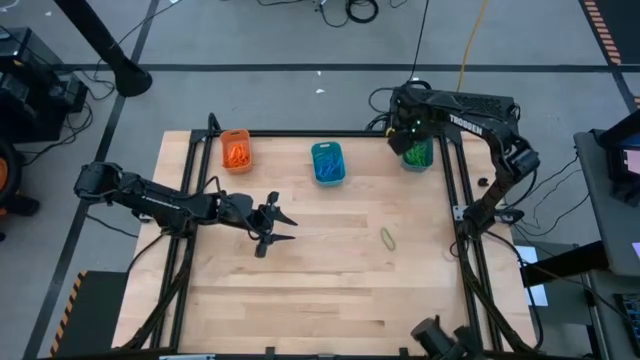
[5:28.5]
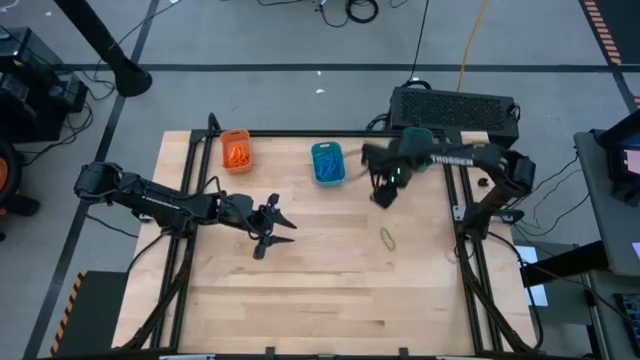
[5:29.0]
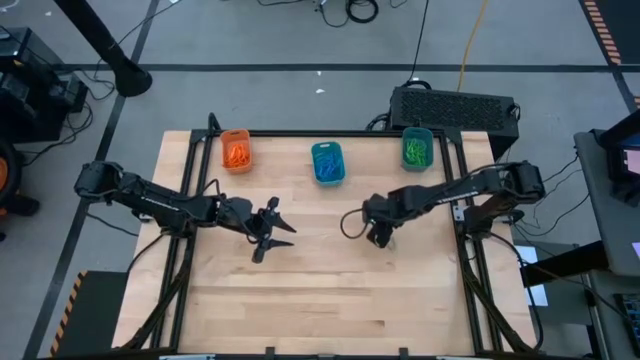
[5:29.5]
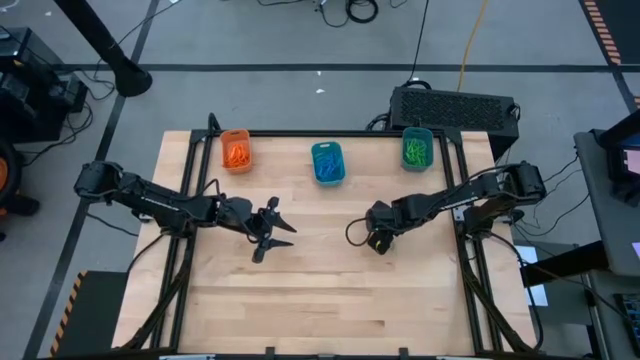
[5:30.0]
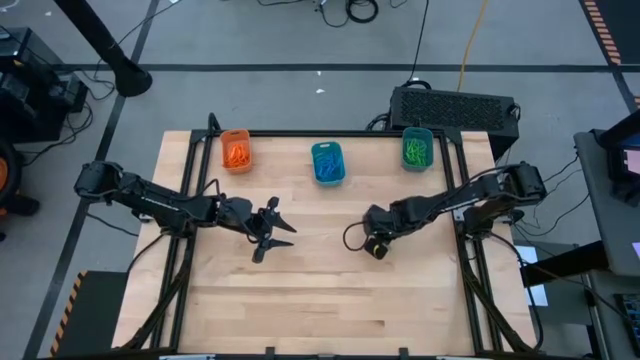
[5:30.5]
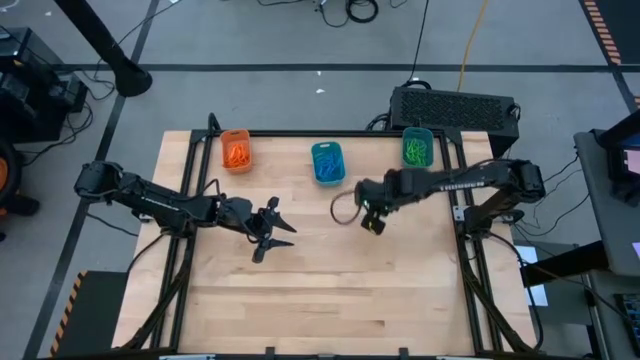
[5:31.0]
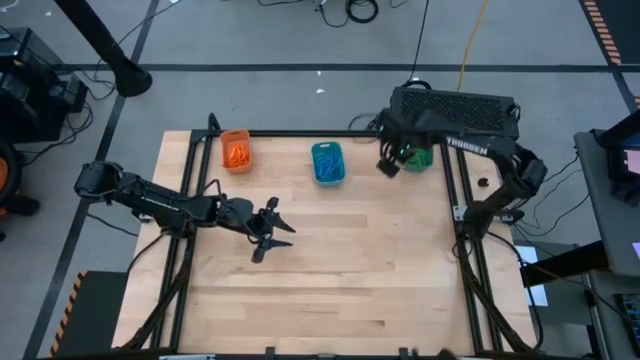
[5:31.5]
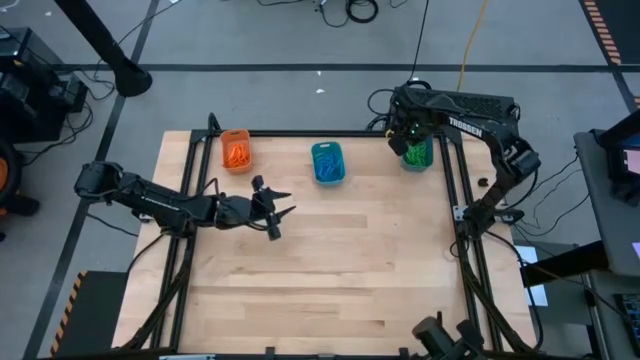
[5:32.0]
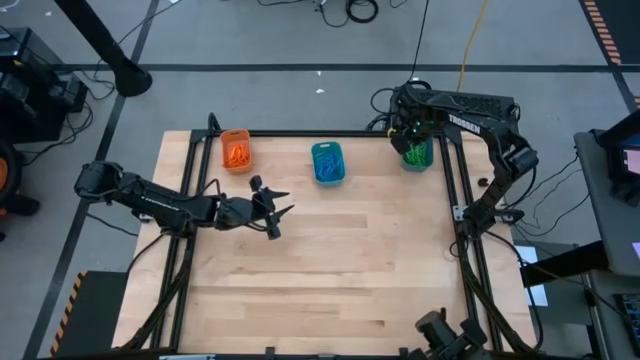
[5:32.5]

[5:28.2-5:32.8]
Task: Sort rubber bands into baskets
Put the green rubber band into the dark blue bin

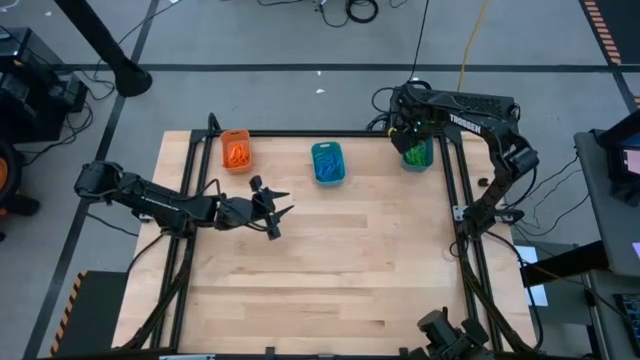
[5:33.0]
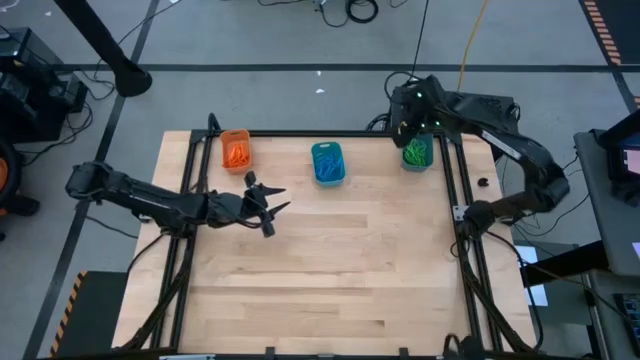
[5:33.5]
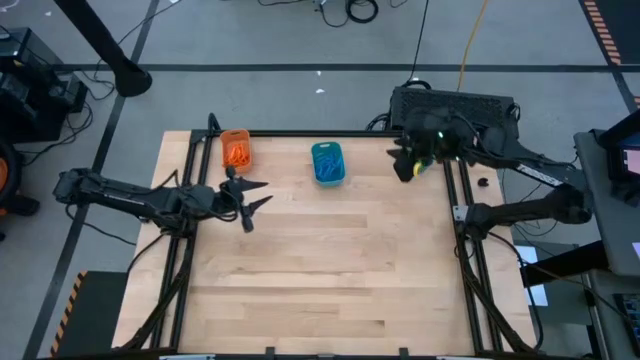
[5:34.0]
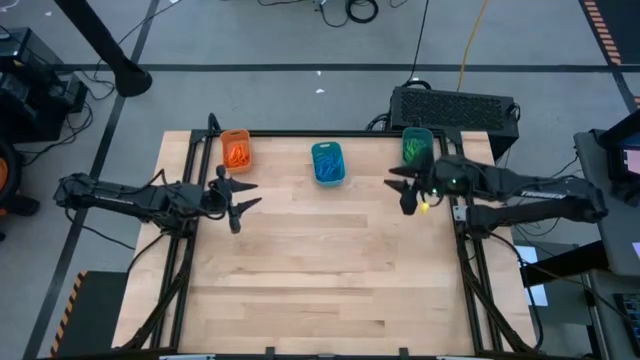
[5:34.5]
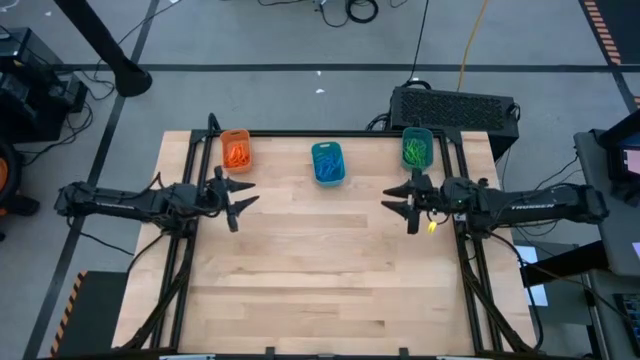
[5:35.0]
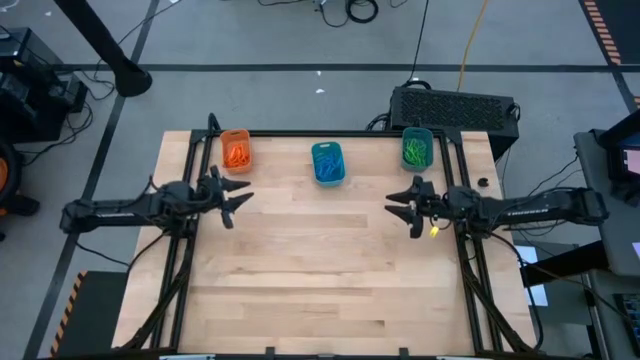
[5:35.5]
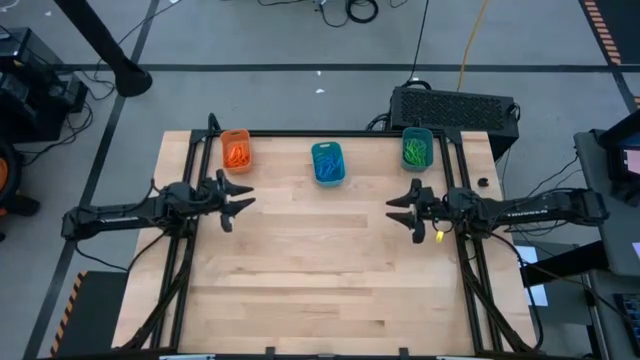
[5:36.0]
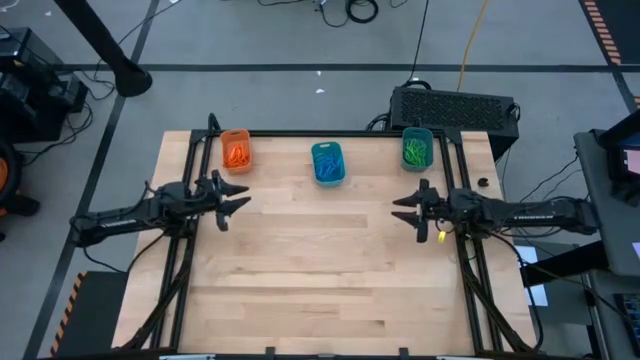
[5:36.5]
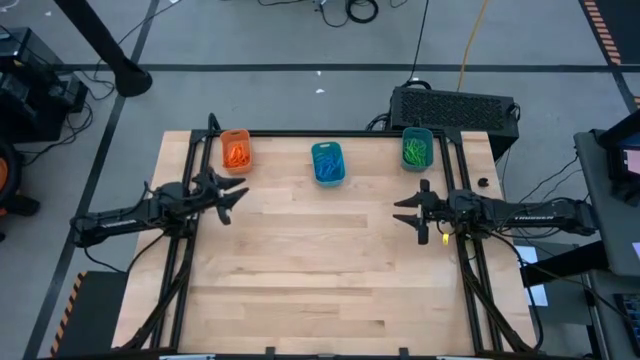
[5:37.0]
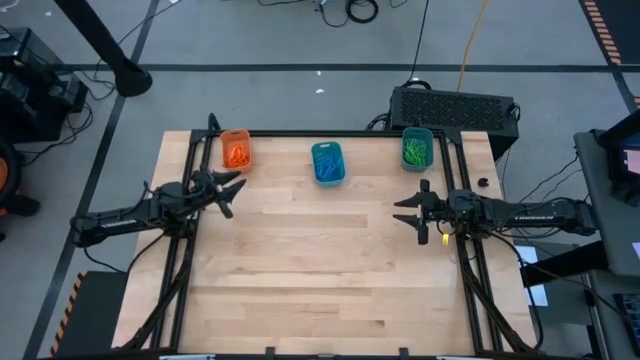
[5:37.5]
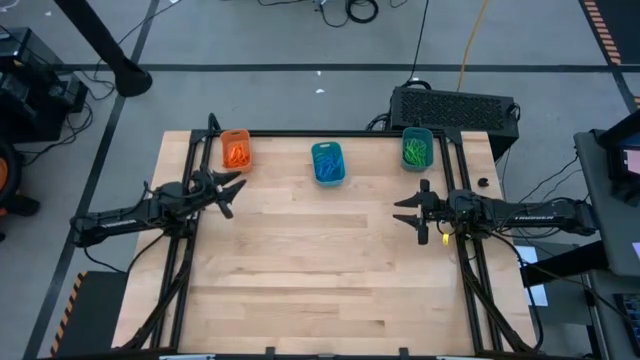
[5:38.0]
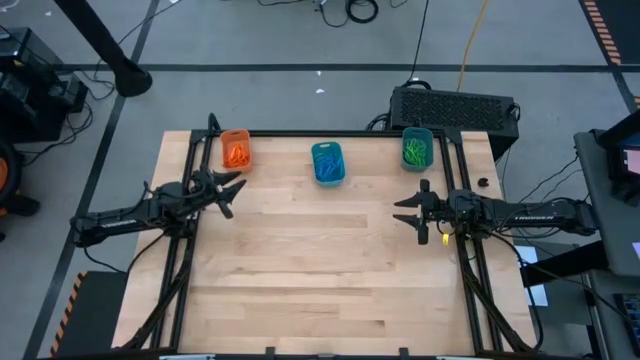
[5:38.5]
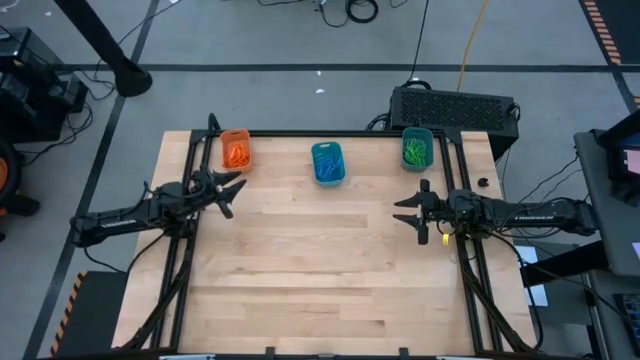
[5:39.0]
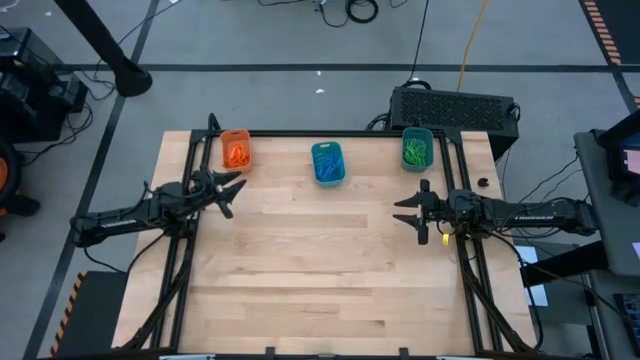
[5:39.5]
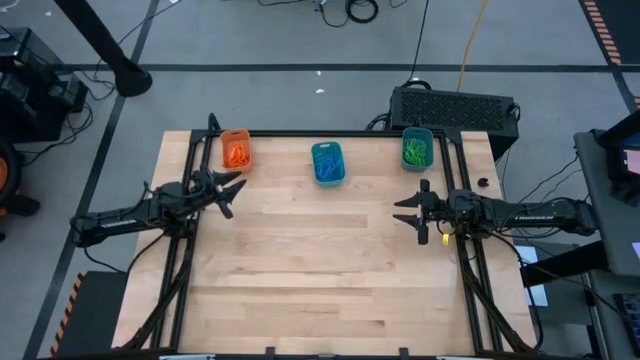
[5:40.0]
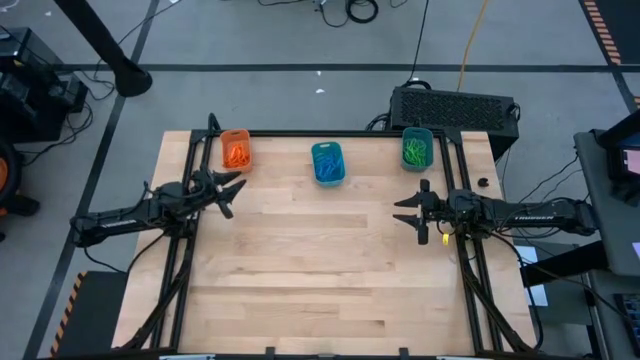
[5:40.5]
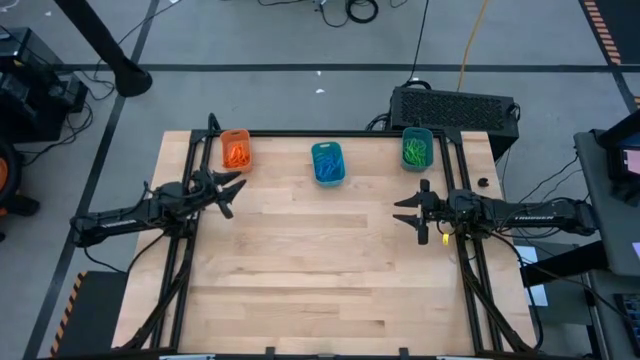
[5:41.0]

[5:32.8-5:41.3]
Return to Home Position
